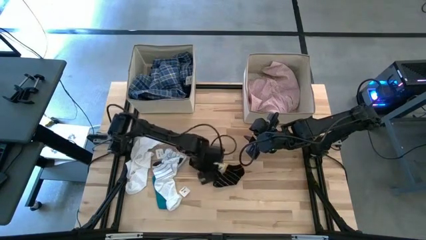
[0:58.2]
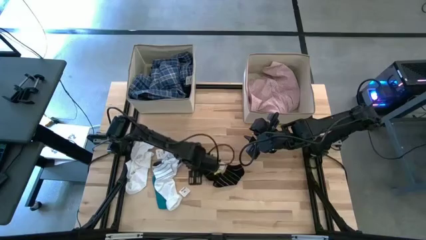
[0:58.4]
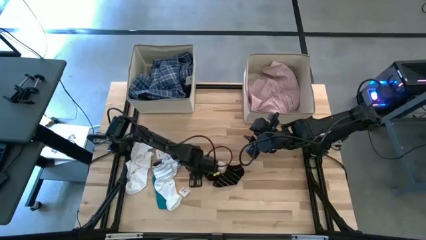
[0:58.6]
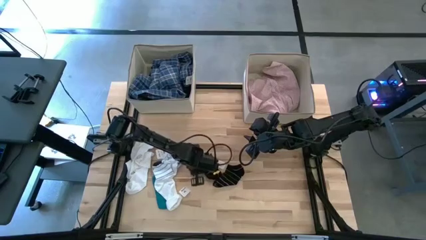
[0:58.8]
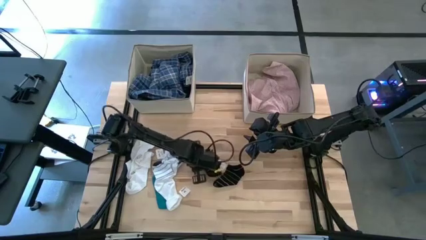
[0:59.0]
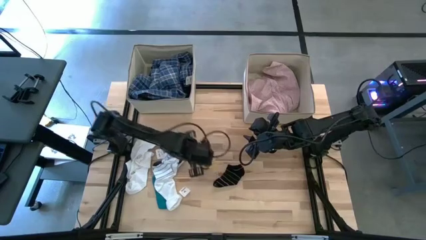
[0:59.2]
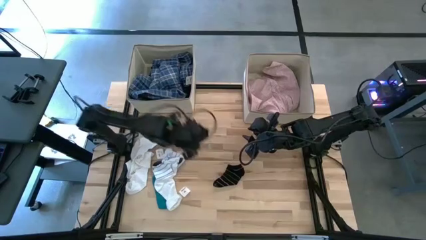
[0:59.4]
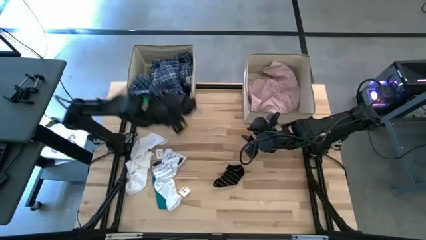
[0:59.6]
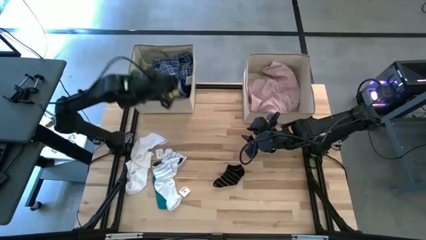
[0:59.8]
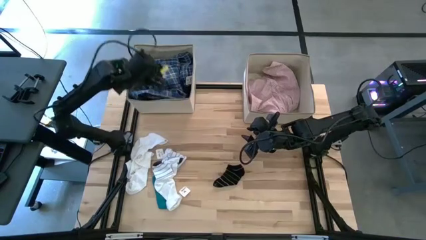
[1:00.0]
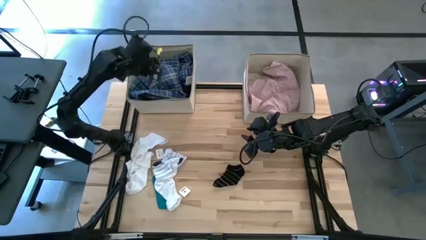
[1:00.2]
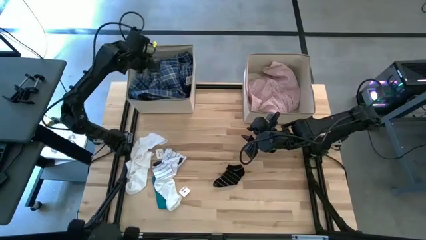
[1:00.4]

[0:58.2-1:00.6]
Task: Sort clothes
Put the black sock into the left laundry organizer

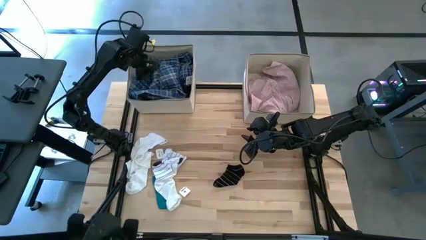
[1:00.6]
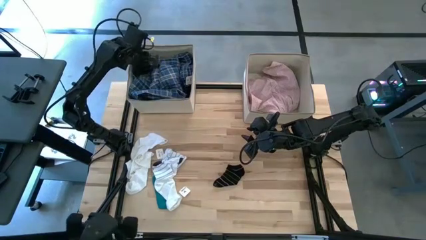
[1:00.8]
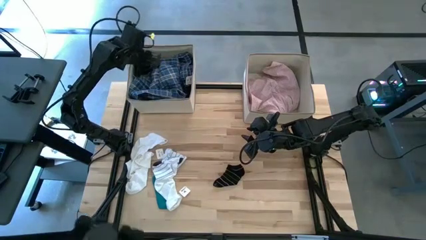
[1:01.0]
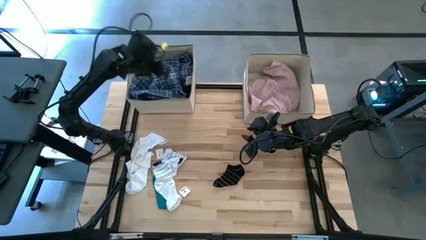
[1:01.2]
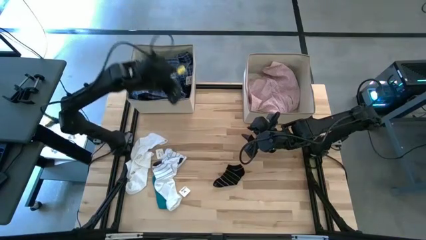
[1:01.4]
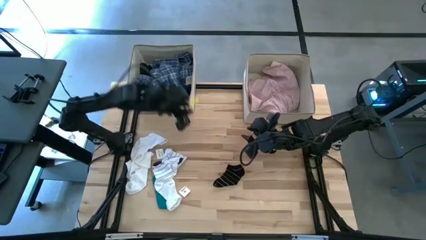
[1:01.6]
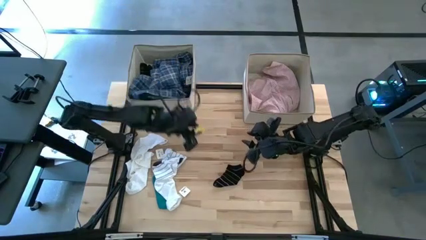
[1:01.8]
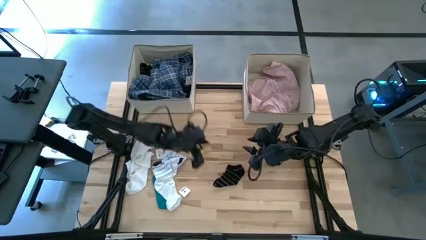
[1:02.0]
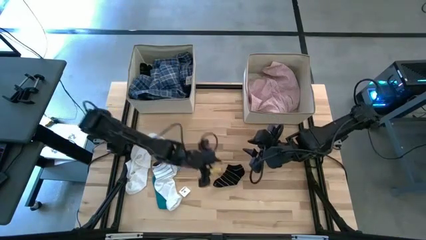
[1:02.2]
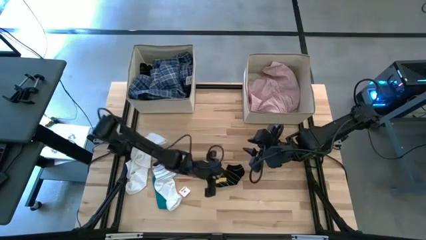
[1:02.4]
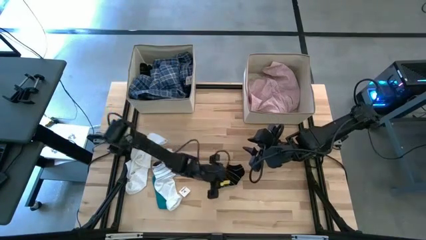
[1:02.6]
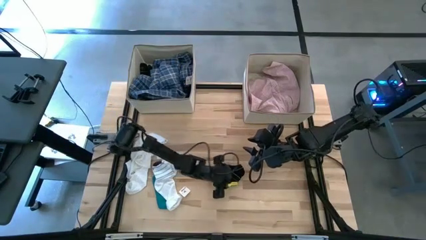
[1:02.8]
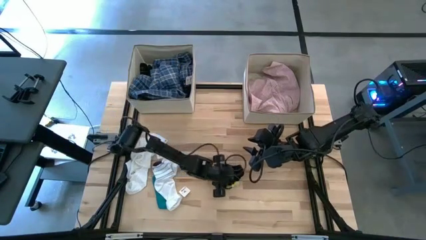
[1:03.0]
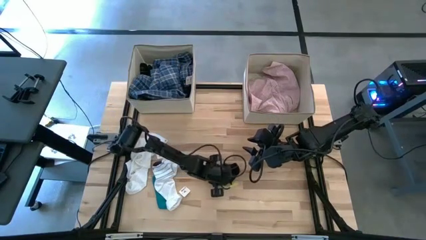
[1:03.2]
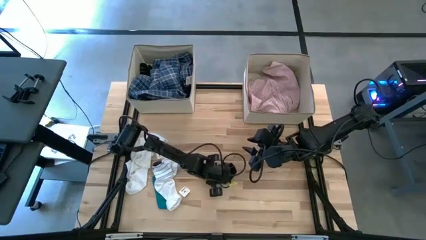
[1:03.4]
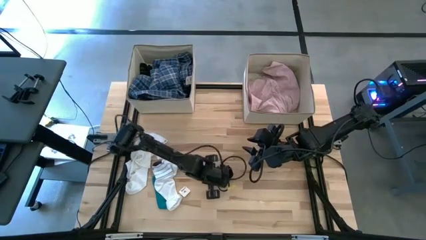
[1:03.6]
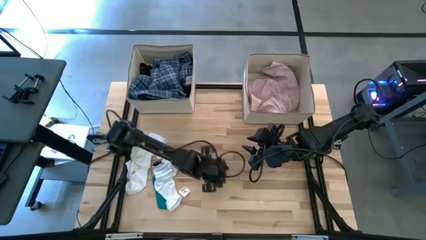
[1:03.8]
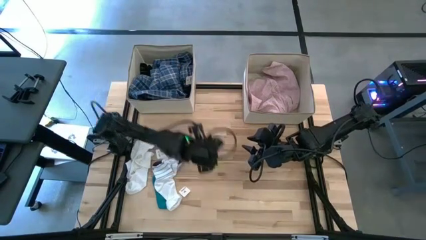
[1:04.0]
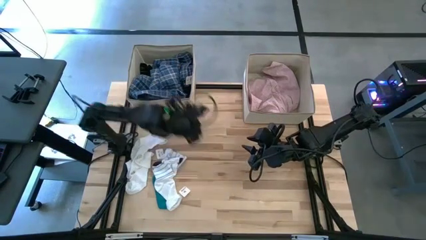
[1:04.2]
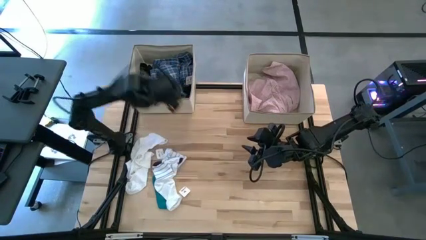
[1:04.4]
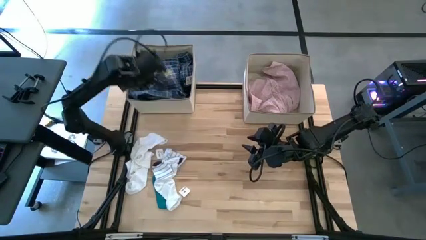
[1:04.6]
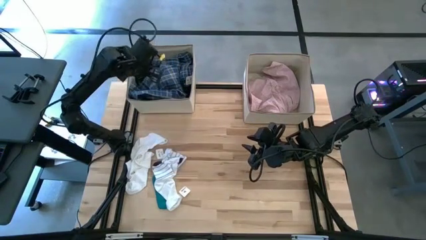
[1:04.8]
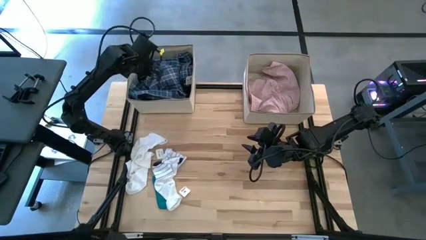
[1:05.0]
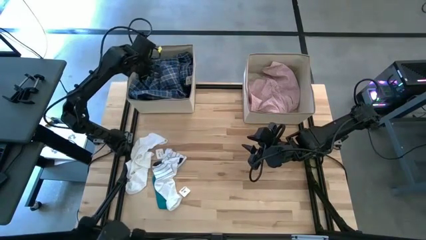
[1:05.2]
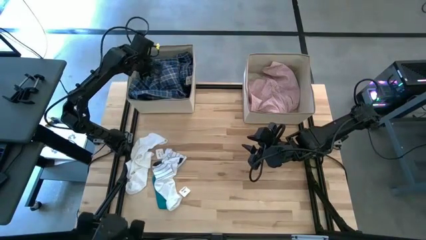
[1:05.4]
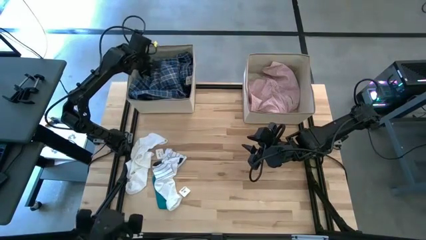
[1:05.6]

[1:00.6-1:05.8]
Put the black sock into the left laundry organizer

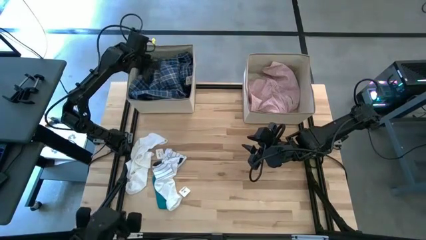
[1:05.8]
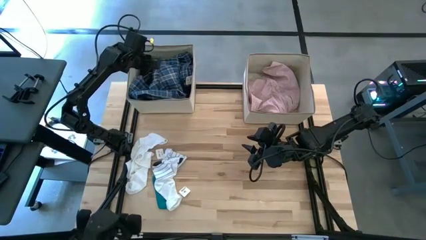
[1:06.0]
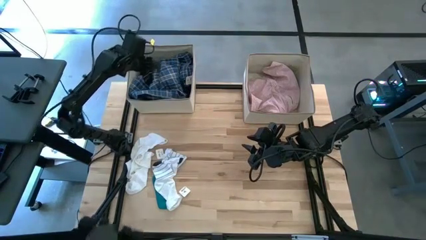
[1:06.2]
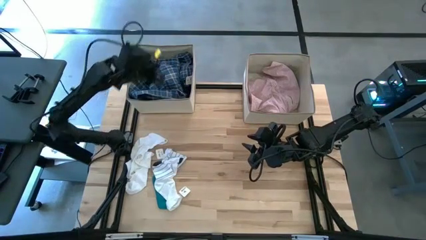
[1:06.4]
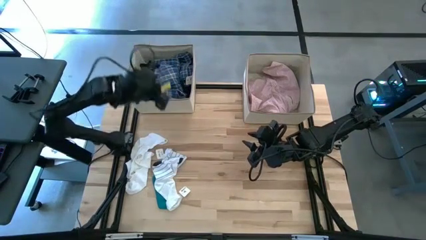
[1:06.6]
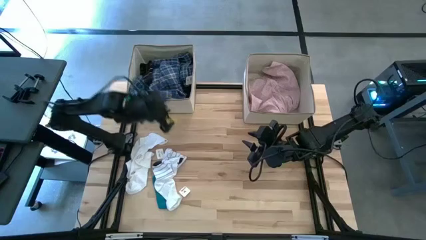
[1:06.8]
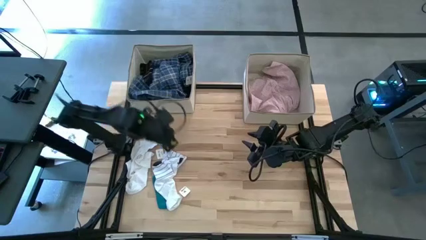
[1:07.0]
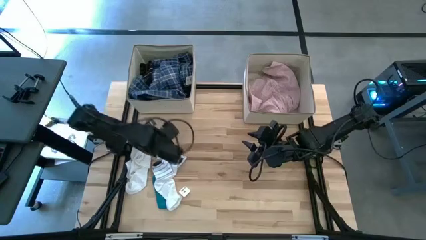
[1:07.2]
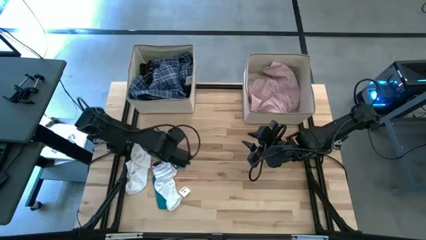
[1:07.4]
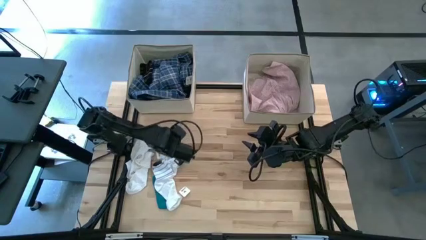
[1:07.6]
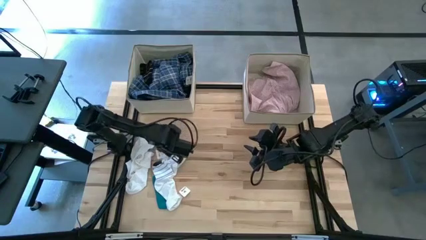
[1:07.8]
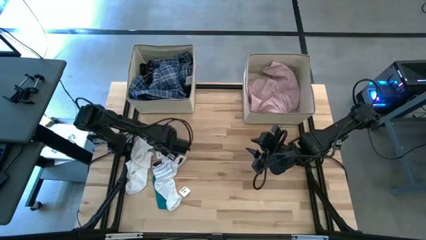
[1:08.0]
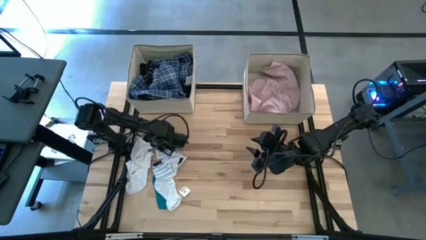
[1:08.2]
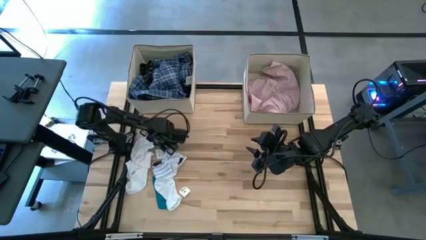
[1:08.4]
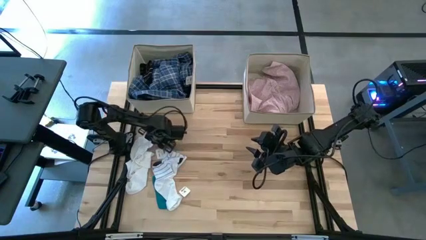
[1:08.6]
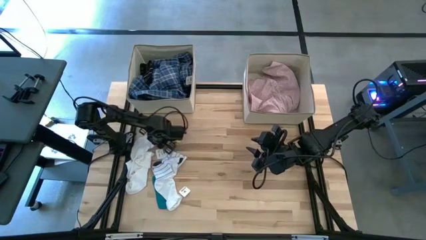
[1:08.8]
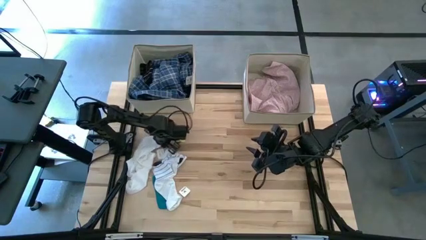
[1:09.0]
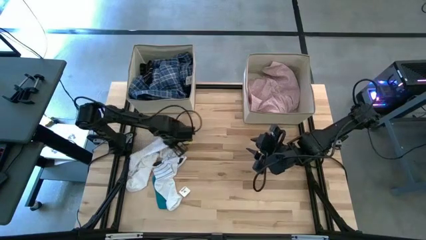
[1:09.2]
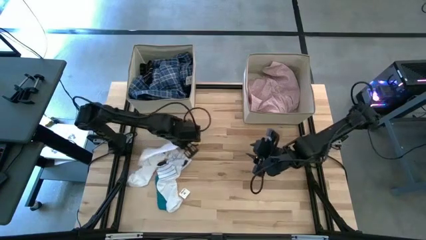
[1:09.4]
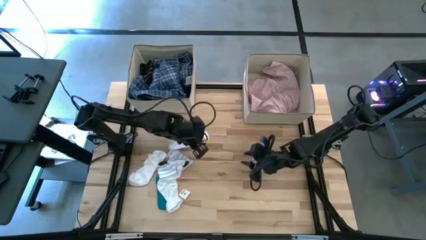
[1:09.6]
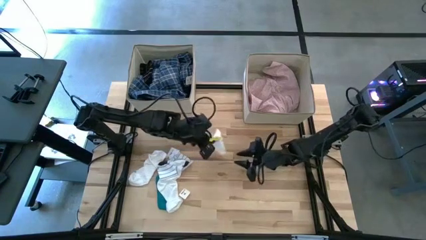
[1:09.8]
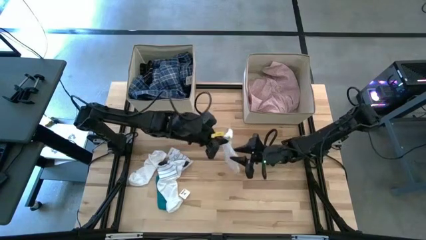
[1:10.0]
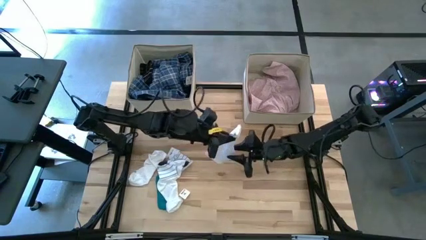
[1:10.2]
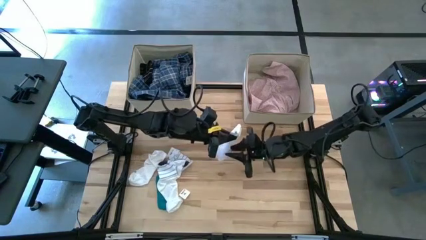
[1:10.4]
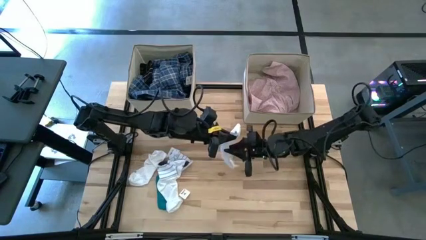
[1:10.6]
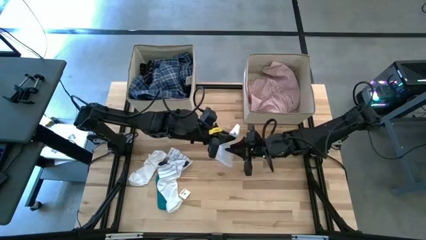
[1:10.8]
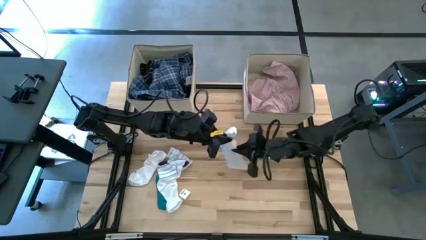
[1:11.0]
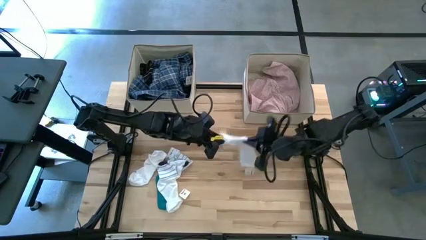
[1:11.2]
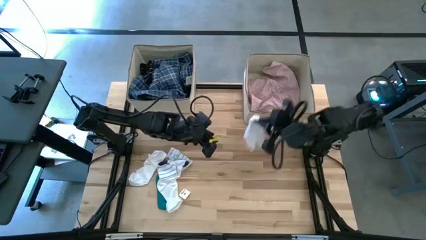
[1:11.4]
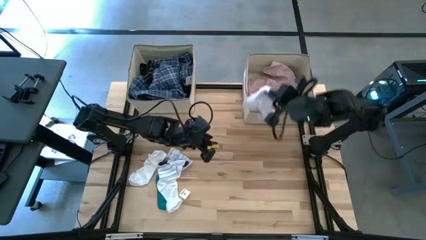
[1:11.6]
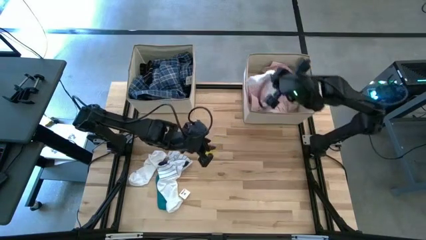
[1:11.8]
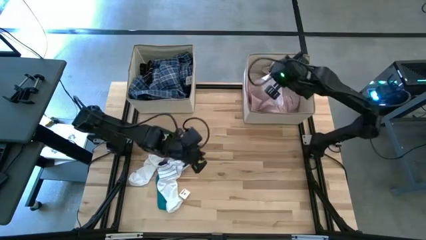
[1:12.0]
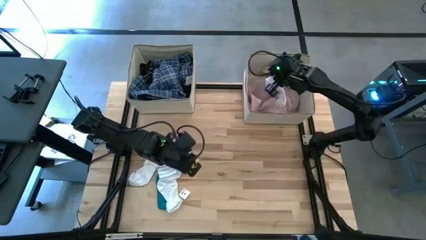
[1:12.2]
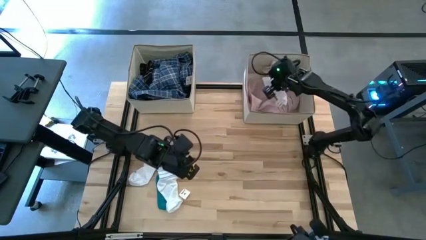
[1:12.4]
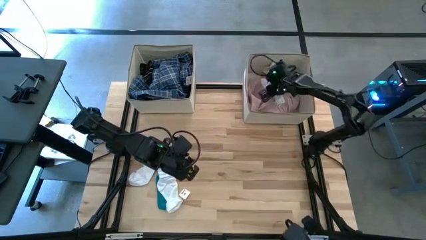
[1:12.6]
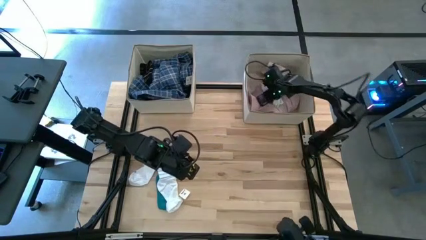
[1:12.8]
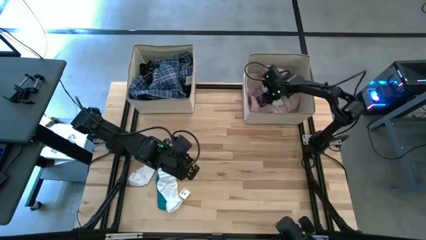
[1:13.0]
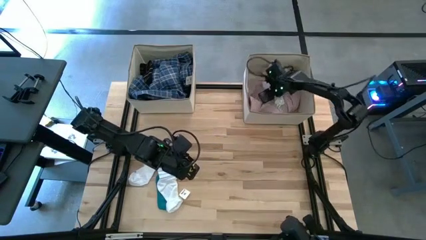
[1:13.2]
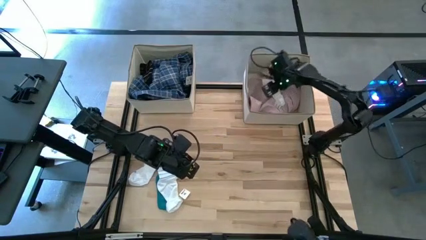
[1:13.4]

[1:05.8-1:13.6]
Put the white sock into the right laundry organizer
